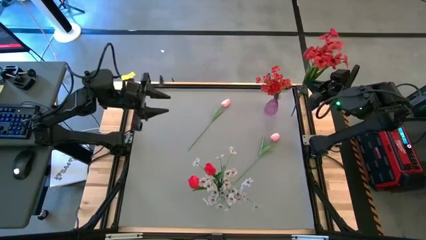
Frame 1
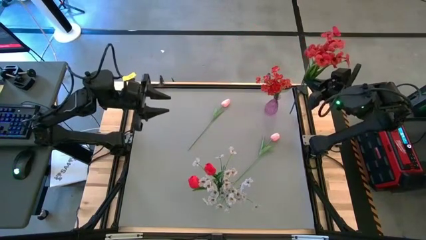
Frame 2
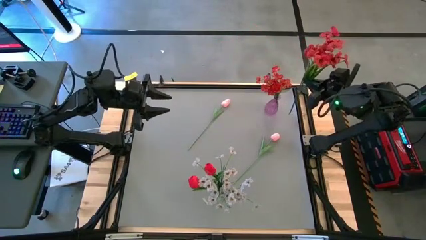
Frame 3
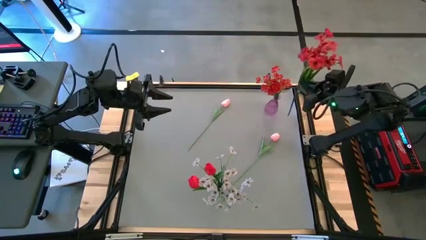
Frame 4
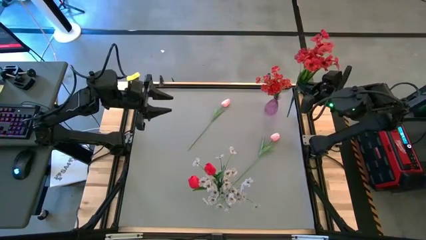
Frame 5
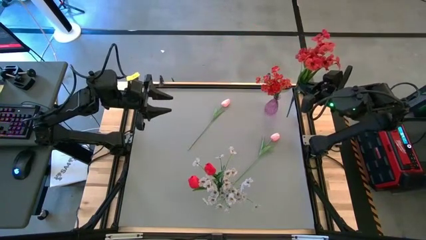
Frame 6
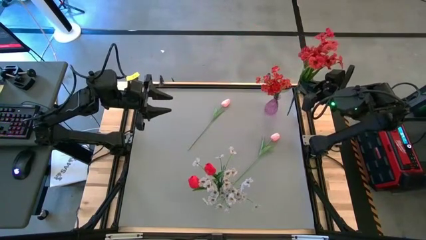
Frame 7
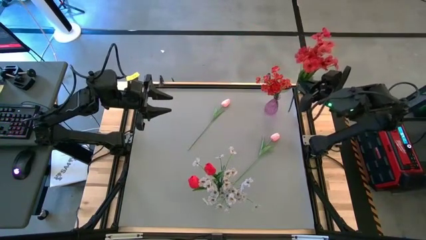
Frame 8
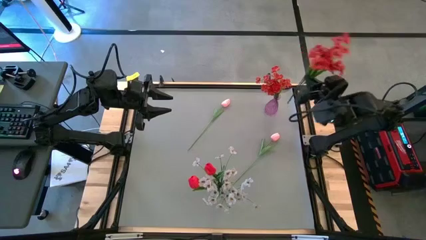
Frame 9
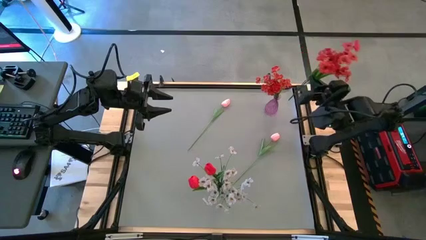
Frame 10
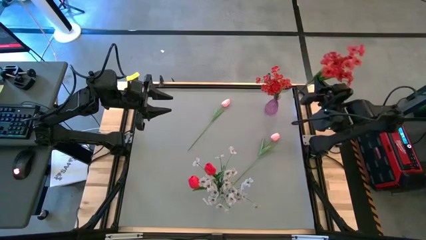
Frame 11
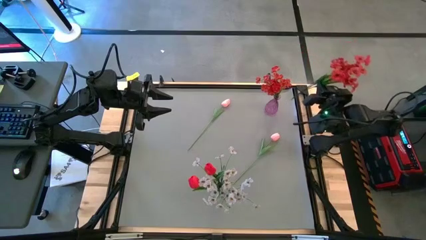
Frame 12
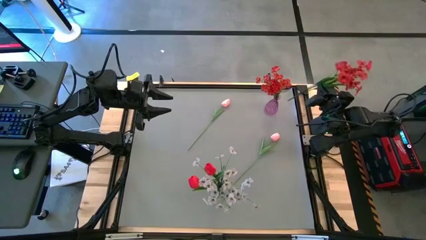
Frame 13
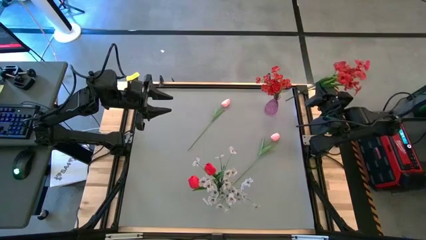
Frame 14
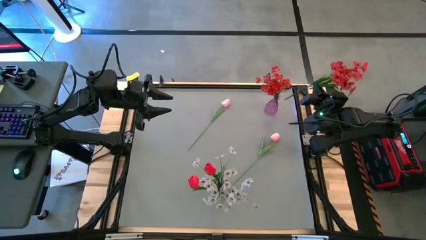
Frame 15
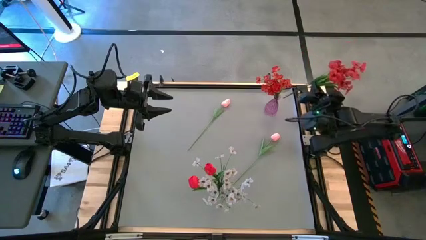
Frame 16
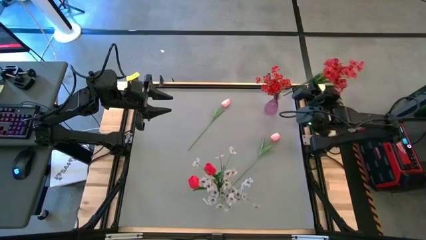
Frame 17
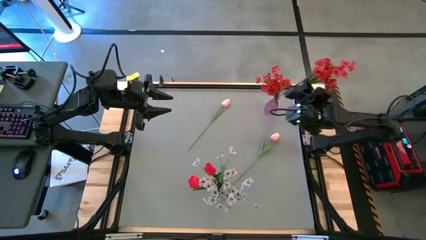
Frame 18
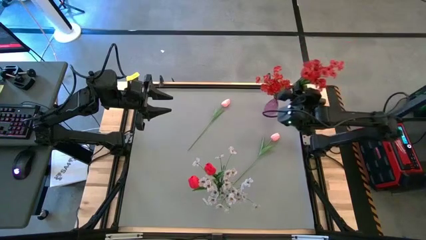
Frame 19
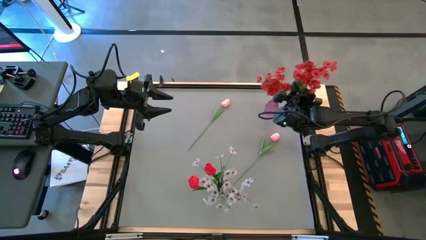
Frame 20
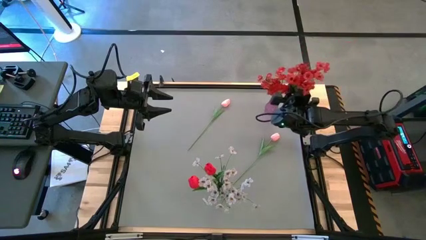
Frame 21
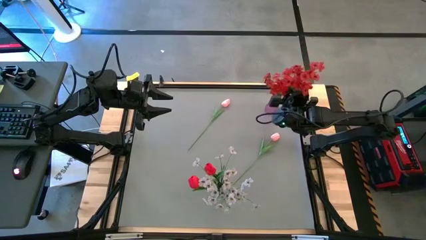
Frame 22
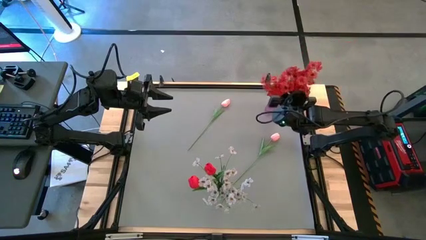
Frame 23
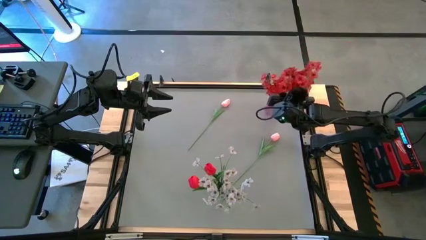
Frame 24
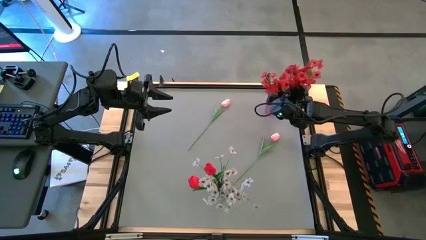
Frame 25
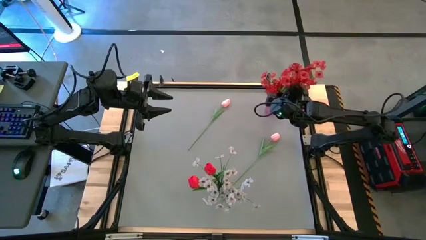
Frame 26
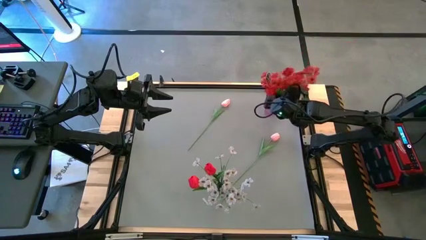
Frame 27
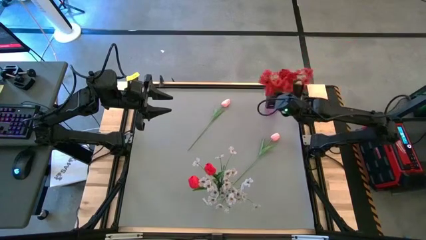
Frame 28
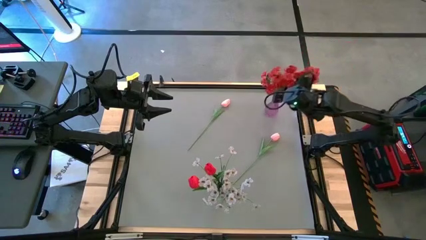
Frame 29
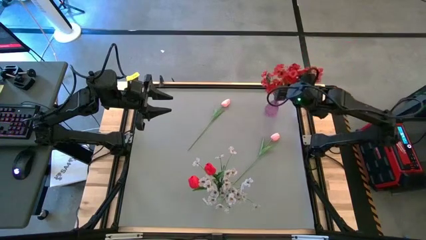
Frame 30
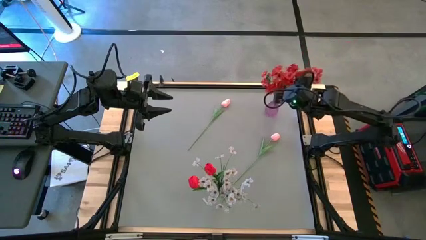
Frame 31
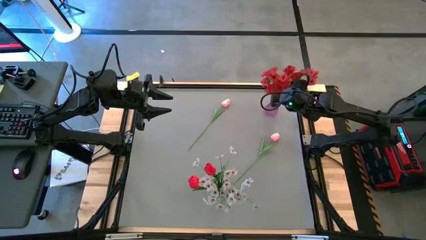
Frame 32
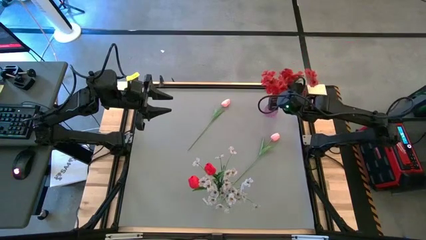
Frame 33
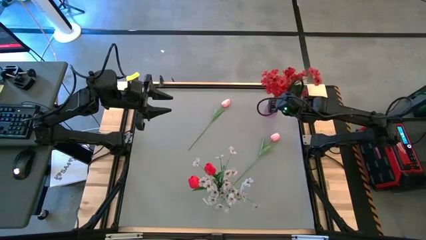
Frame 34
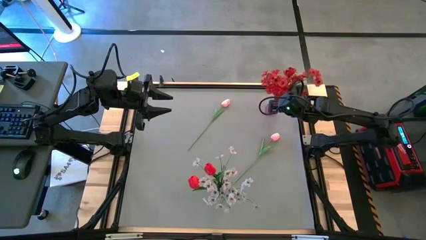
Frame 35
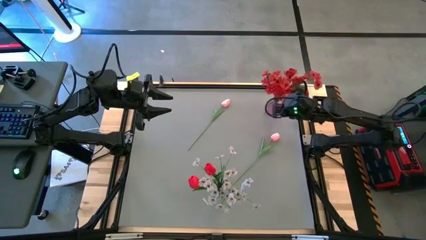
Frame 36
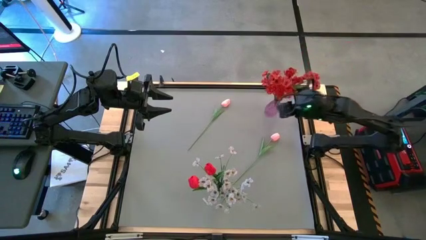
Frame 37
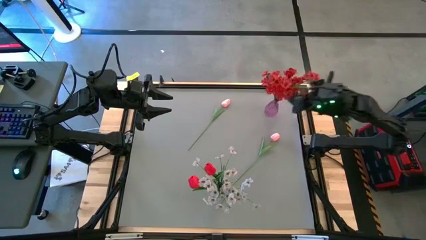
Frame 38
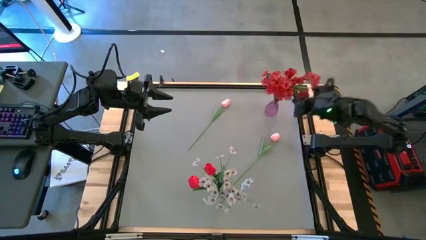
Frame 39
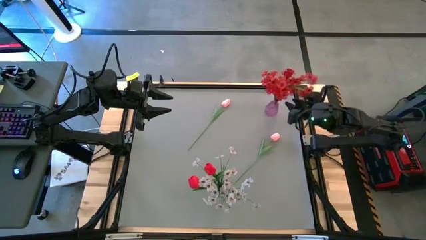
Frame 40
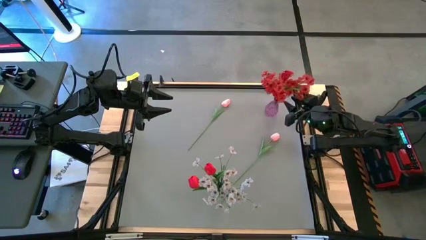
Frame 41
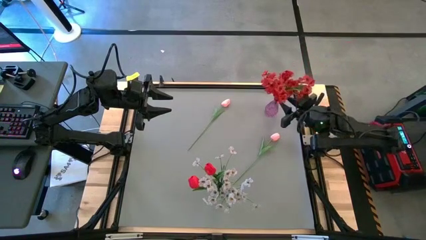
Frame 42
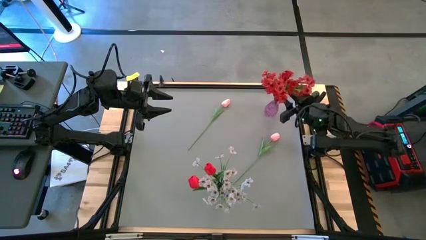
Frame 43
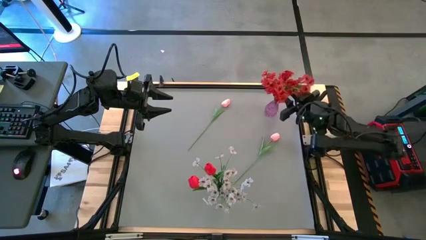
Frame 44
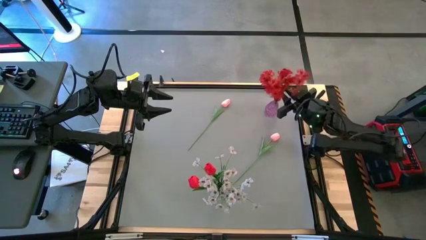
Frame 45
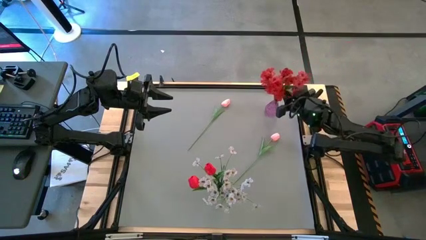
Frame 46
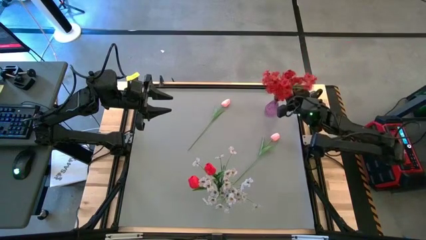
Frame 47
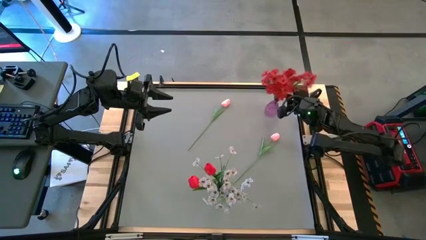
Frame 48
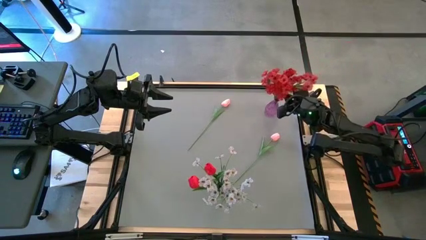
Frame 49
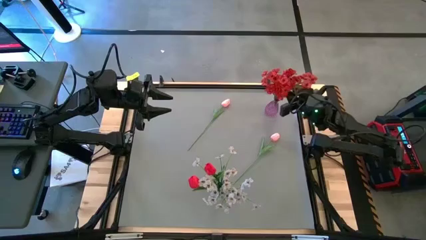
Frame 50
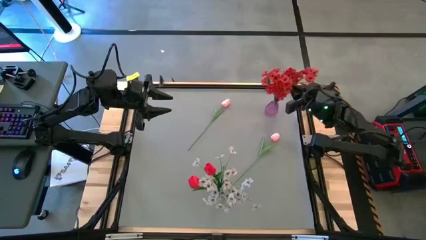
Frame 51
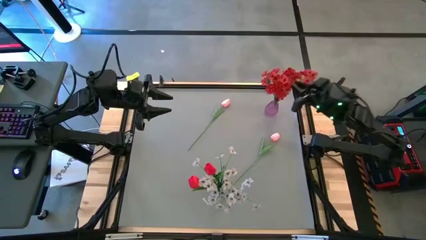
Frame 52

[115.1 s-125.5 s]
Task: Sort flowers into vase by color
Put the red flowers into the violet vase

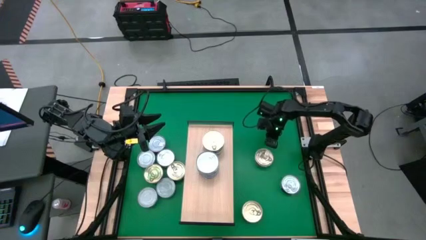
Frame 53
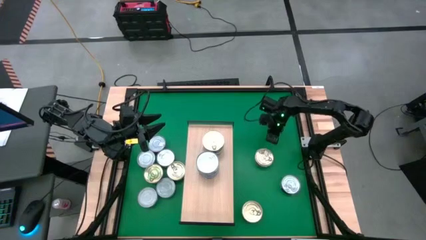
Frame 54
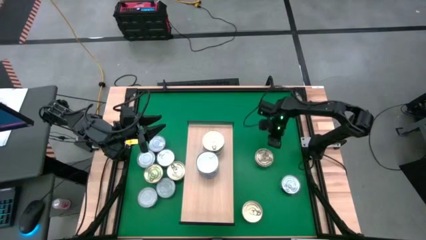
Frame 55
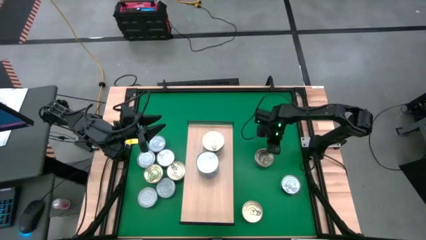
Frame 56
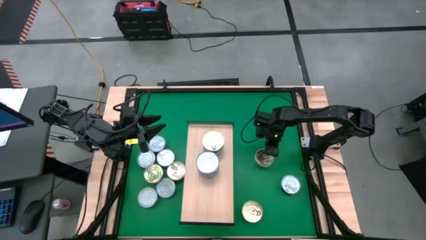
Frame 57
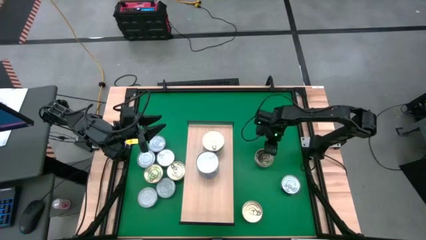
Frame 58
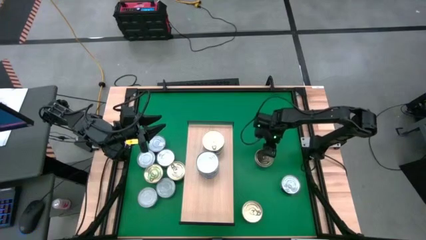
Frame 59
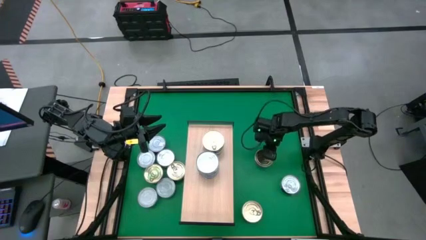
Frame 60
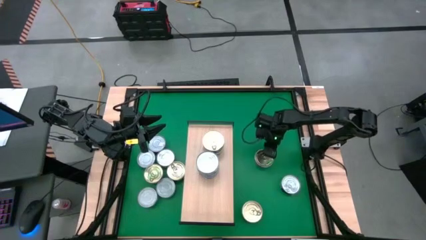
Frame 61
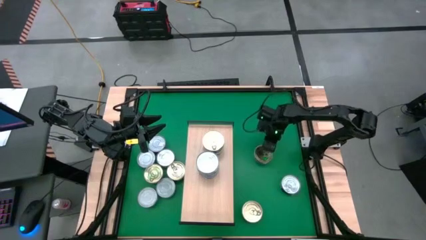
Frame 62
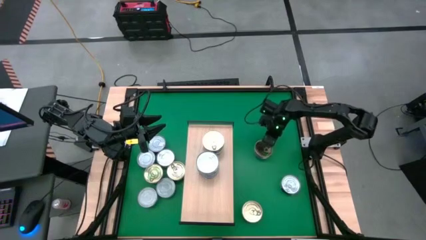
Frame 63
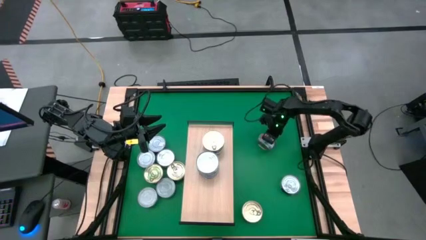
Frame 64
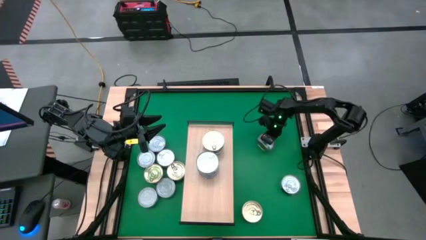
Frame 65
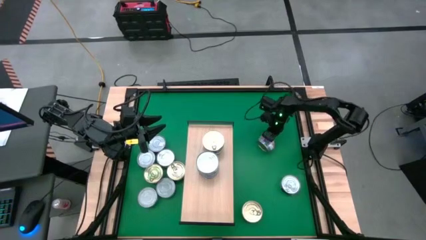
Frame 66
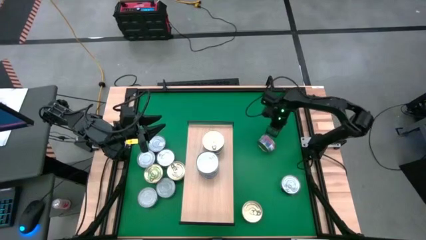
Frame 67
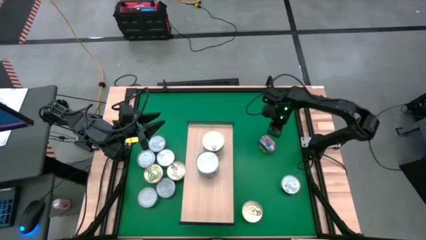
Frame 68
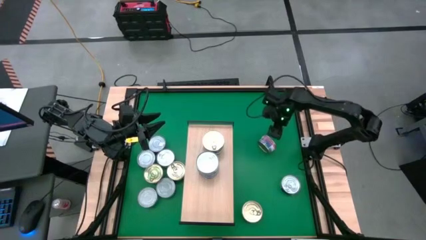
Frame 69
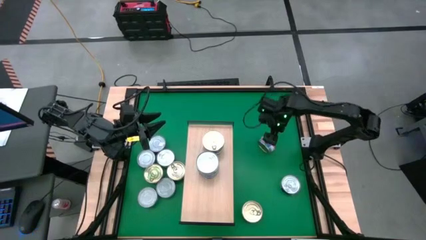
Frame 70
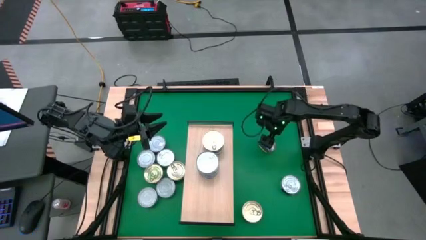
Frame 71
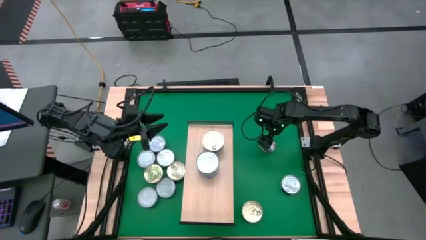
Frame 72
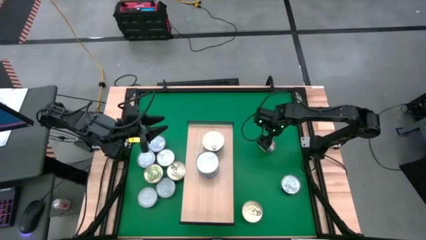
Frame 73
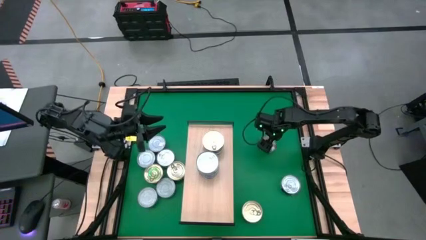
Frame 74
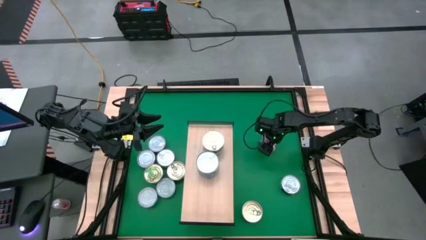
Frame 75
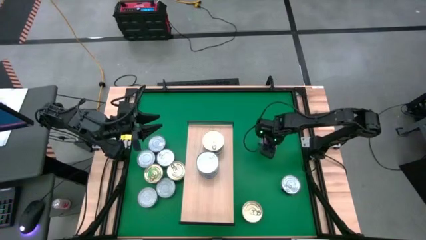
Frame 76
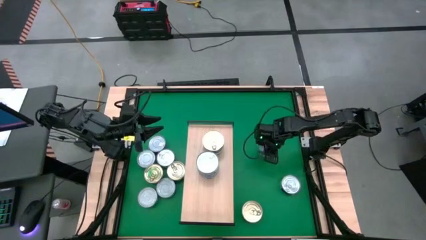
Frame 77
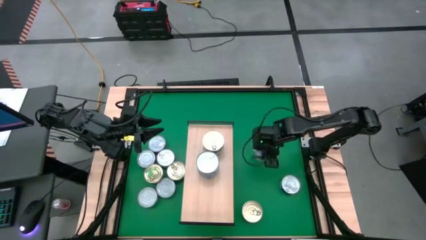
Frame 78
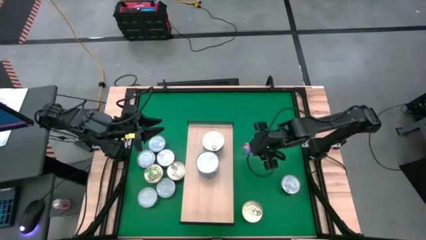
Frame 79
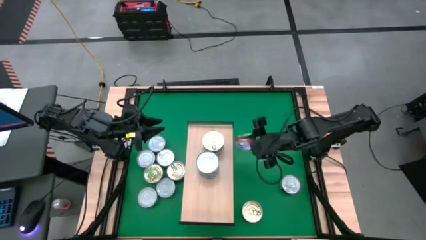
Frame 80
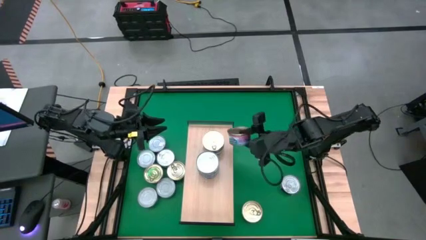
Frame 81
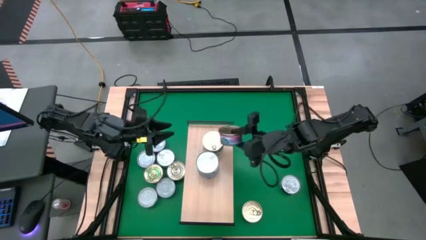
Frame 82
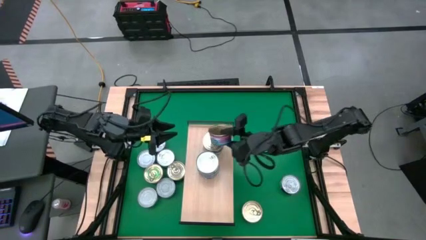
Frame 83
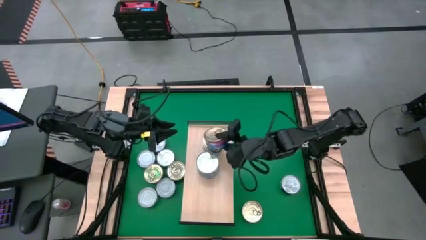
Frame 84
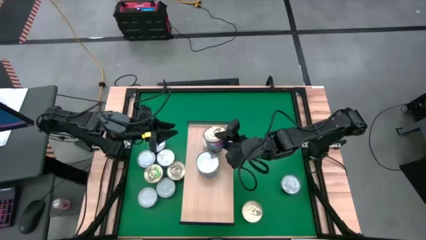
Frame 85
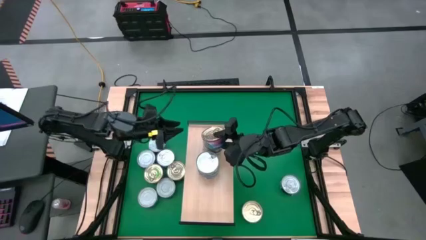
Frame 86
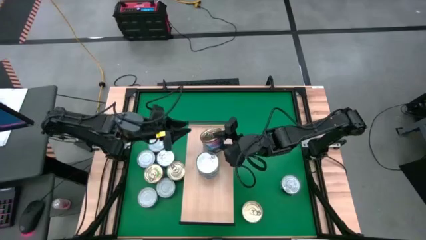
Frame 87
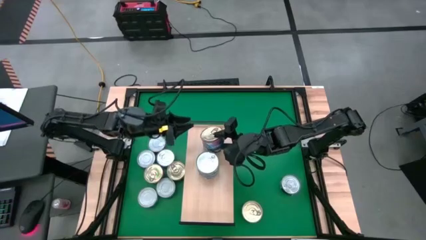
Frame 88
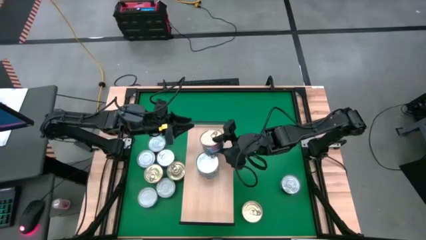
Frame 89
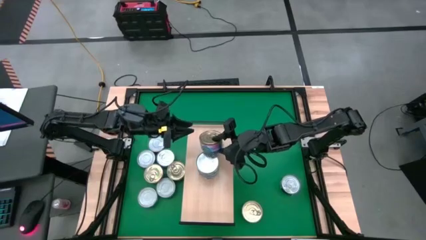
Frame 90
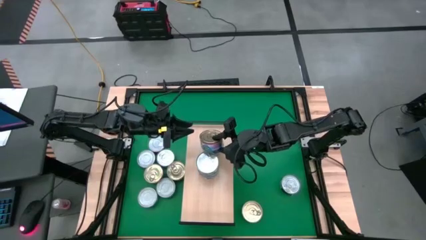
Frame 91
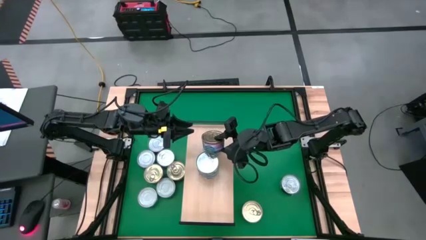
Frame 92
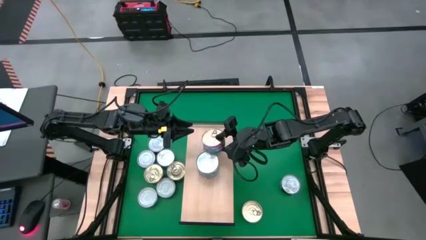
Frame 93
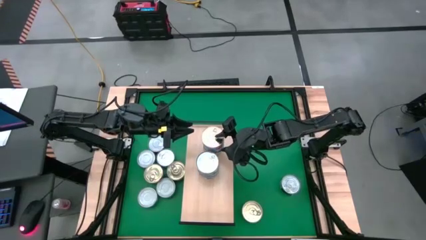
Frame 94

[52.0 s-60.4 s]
Task: Stack canned seafood by type on shelf
Stack the blue pink tuna can on top of the other blue pink tuna cans on the shelf
